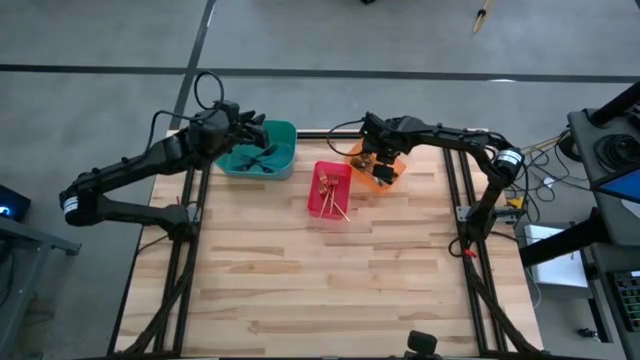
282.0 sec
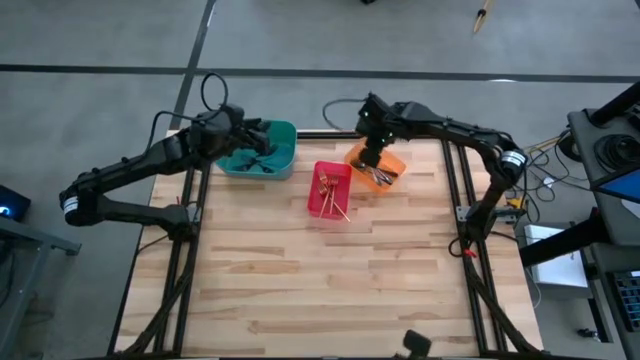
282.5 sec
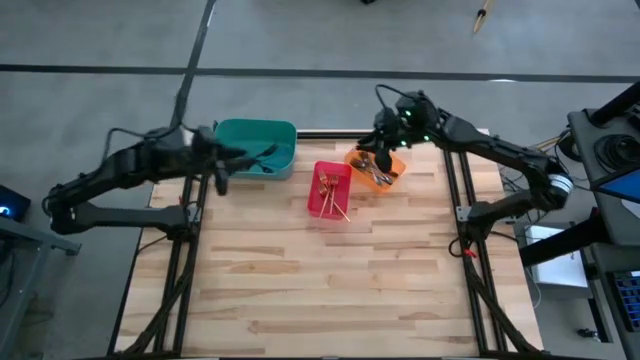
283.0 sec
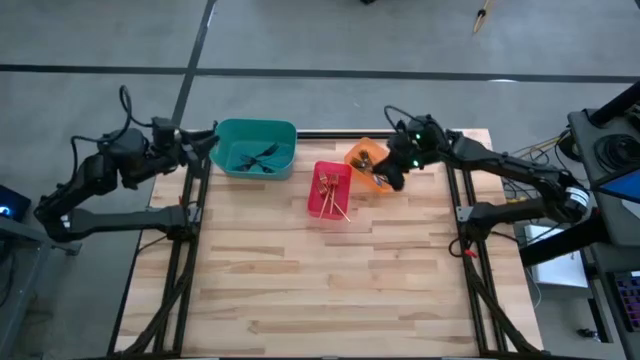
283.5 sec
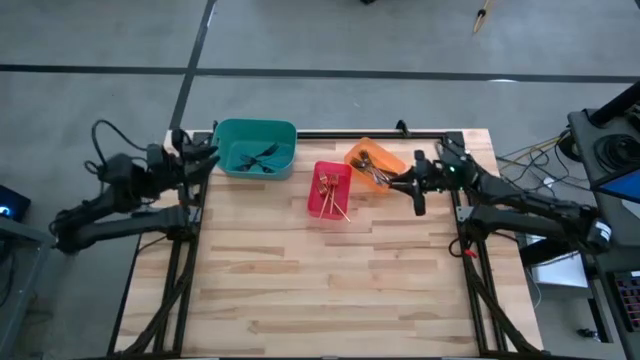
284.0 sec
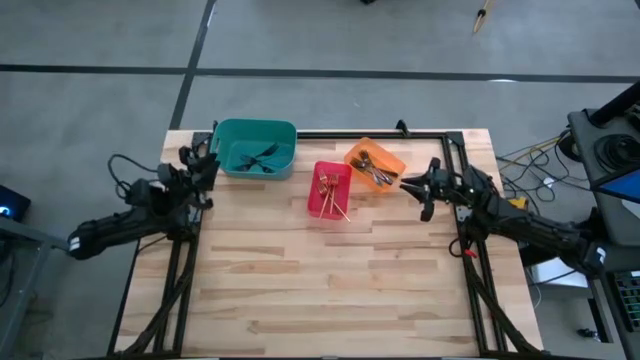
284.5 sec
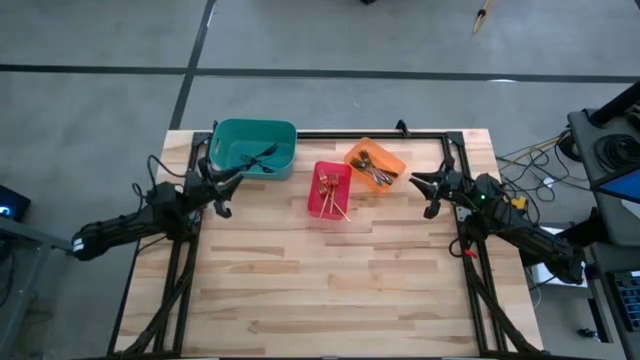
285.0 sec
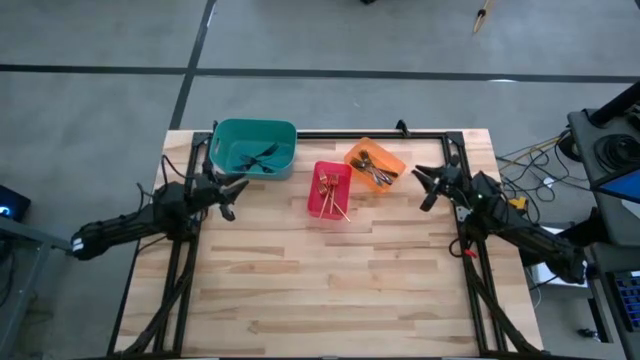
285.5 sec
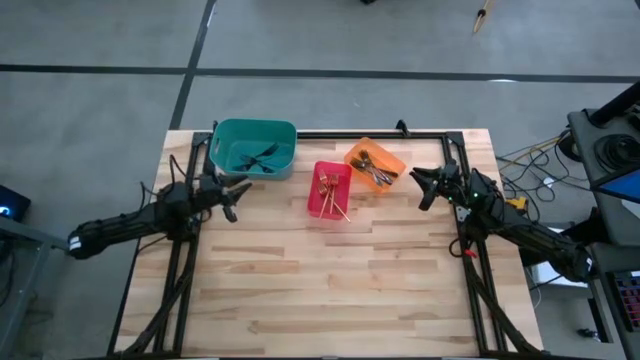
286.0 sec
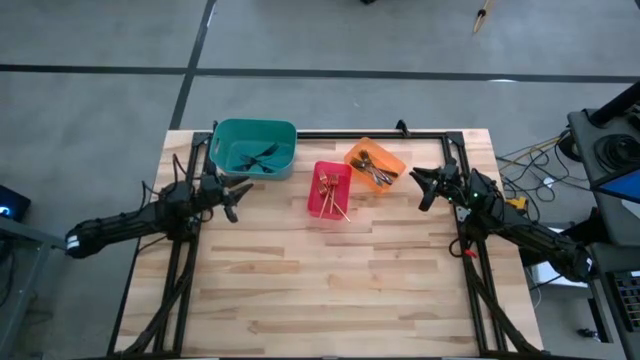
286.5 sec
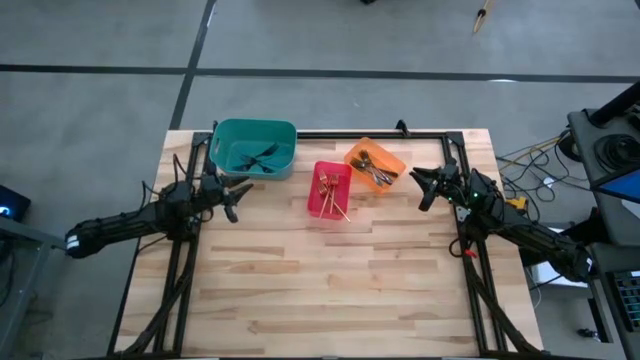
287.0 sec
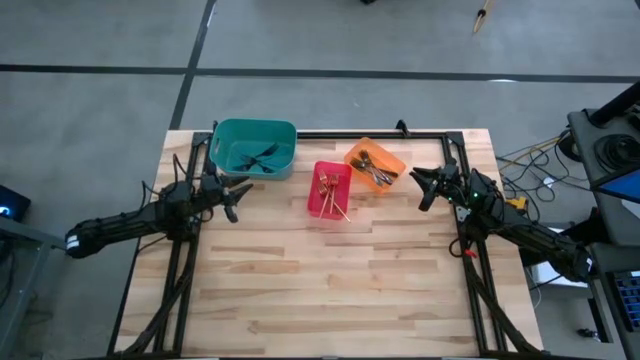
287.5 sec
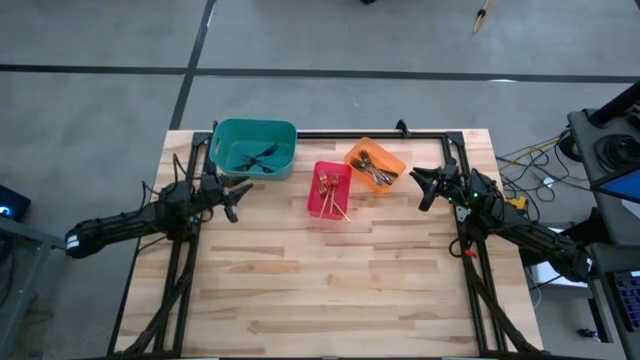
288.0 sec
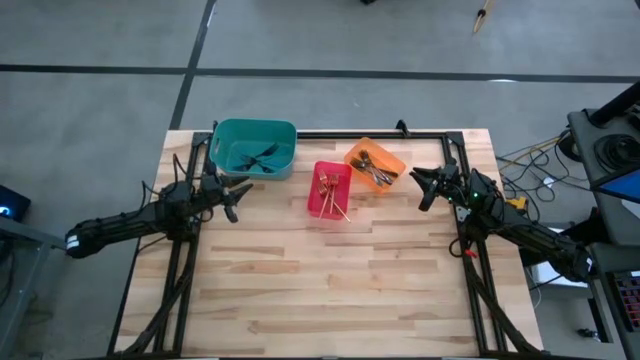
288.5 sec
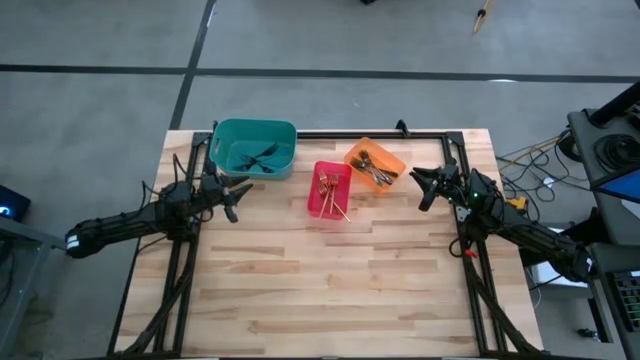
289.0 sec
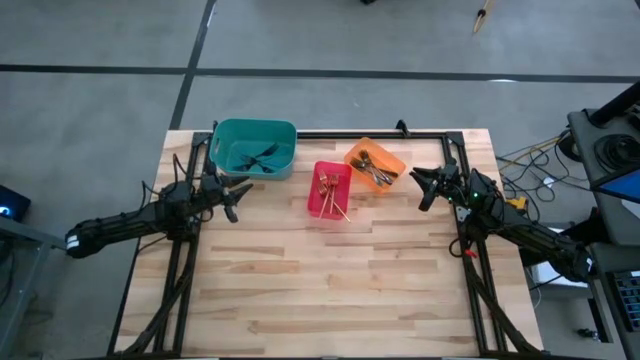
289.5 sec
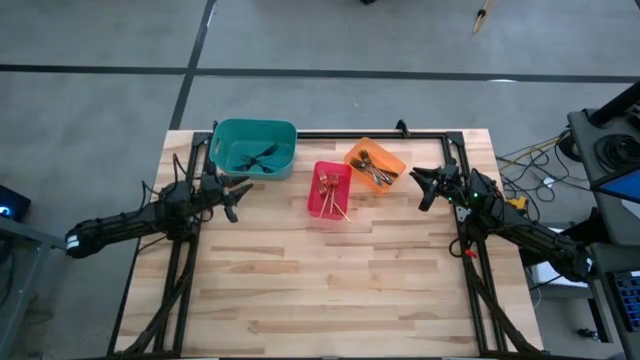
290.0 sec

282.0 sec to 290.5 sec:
Task: Sort silverware by color (type)
Return to Home Position

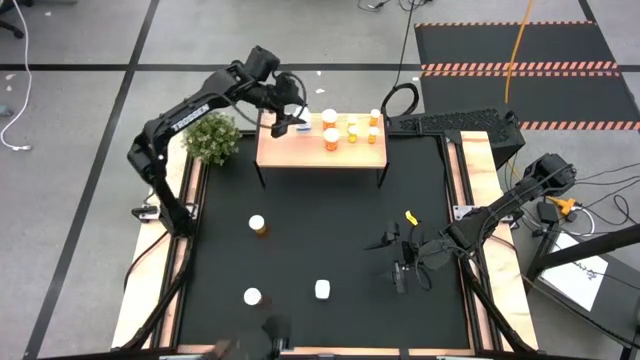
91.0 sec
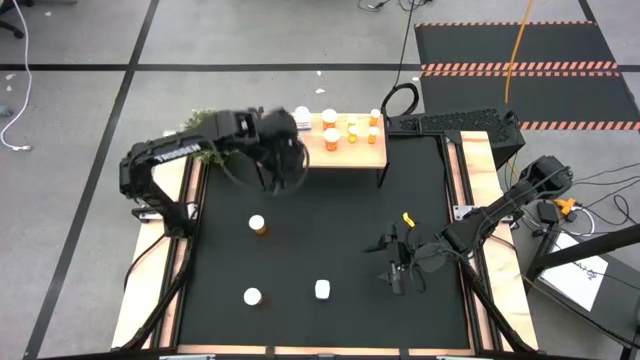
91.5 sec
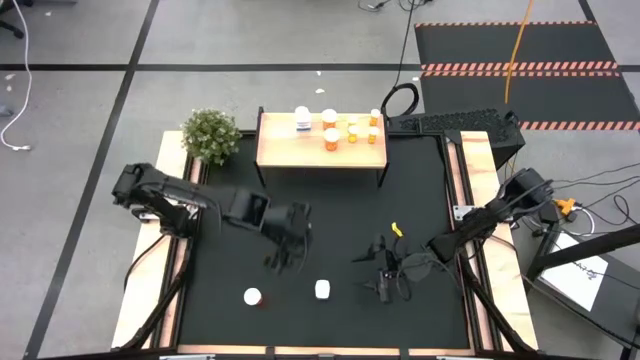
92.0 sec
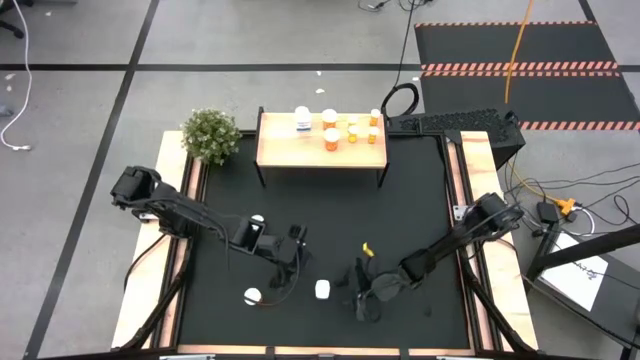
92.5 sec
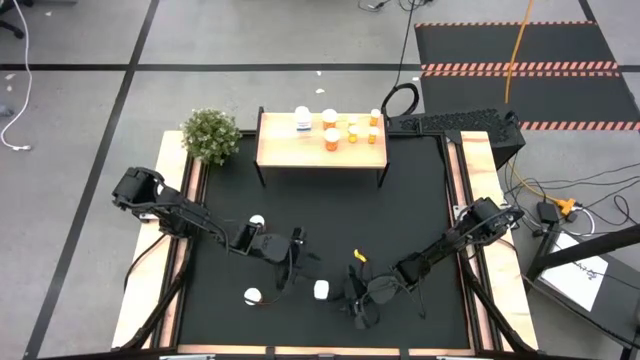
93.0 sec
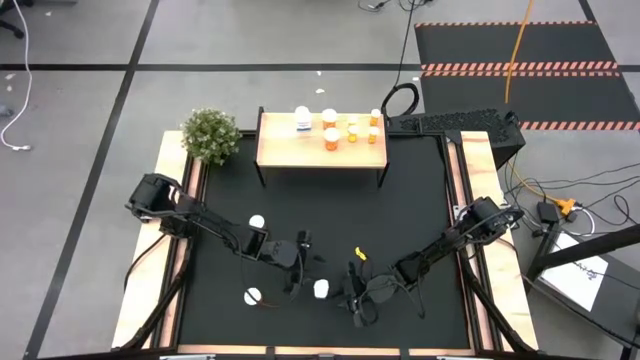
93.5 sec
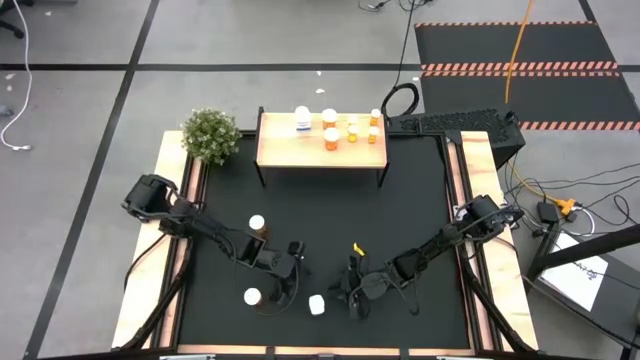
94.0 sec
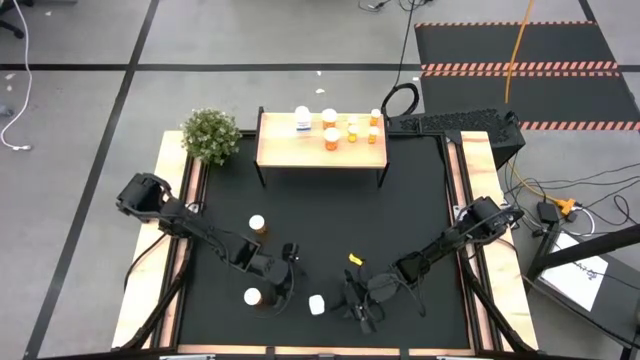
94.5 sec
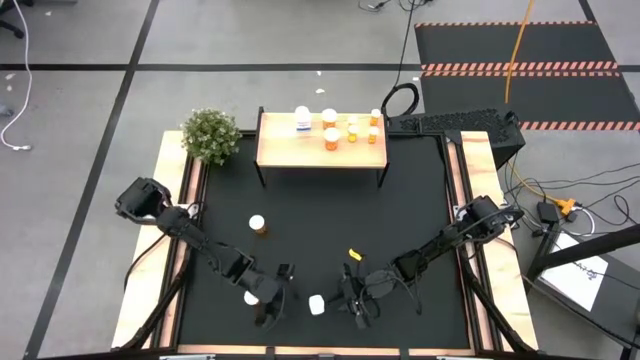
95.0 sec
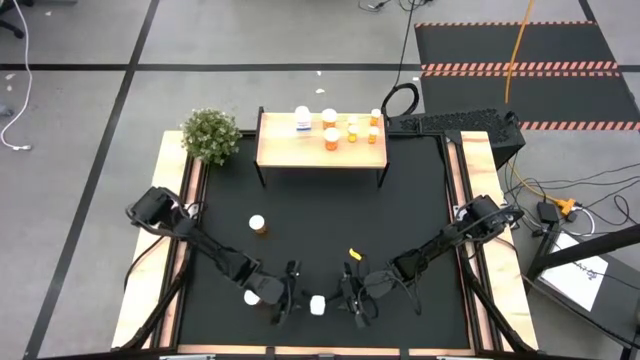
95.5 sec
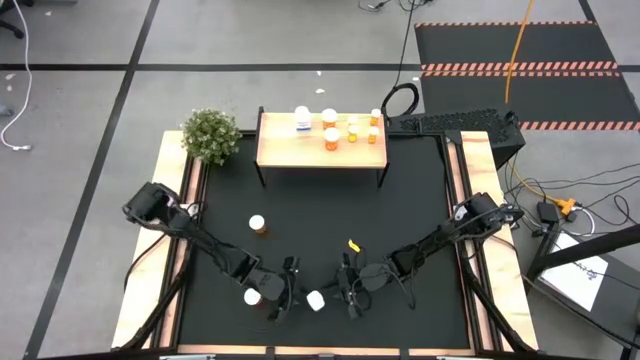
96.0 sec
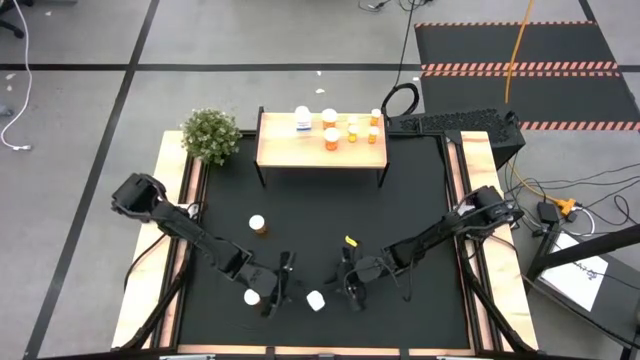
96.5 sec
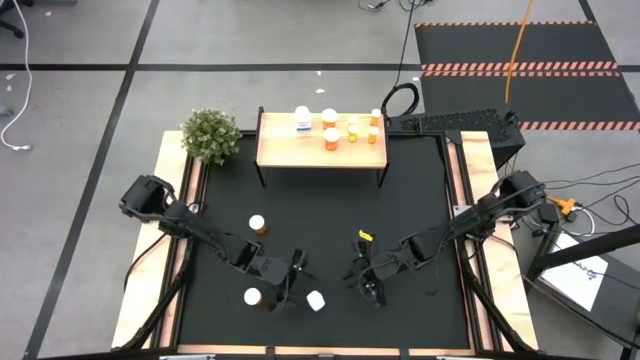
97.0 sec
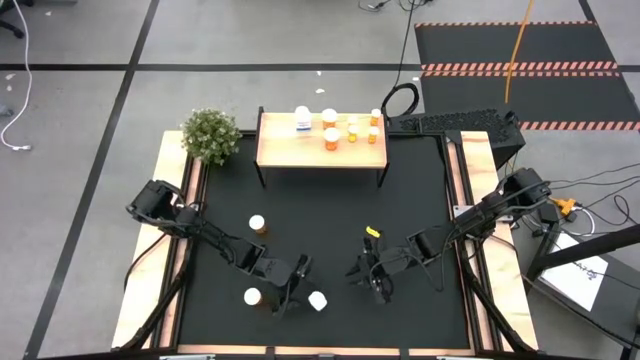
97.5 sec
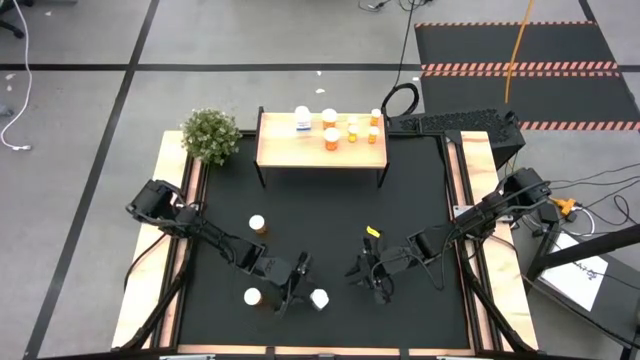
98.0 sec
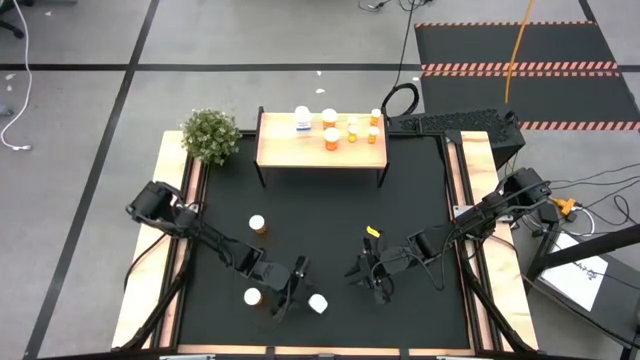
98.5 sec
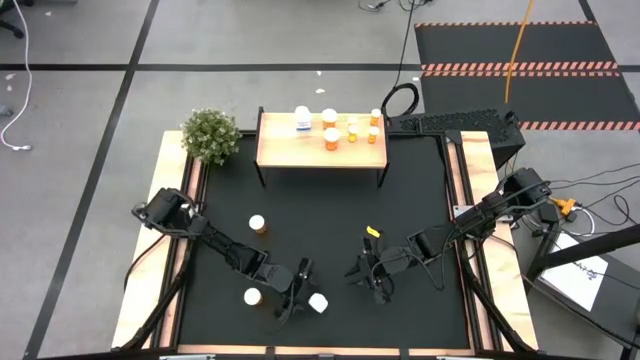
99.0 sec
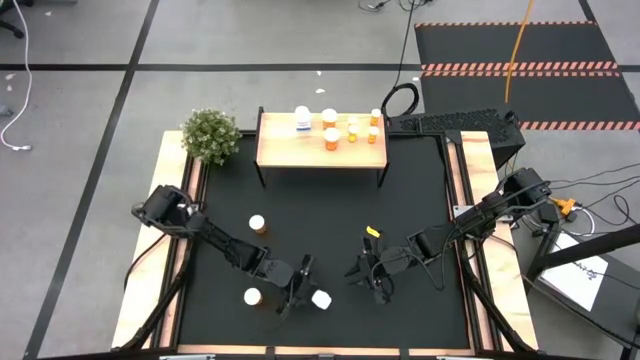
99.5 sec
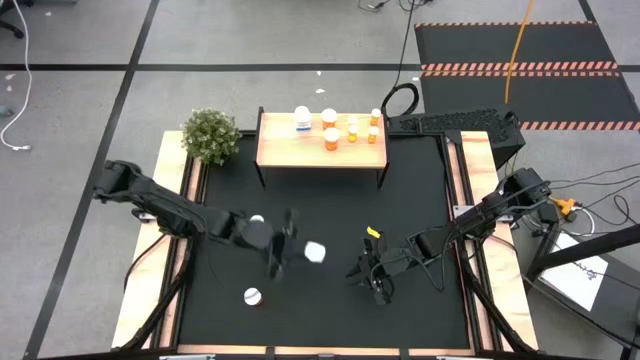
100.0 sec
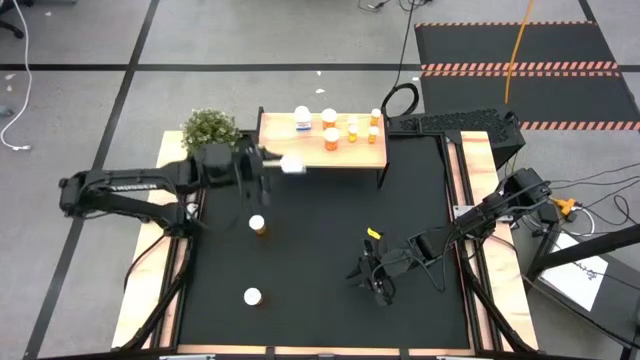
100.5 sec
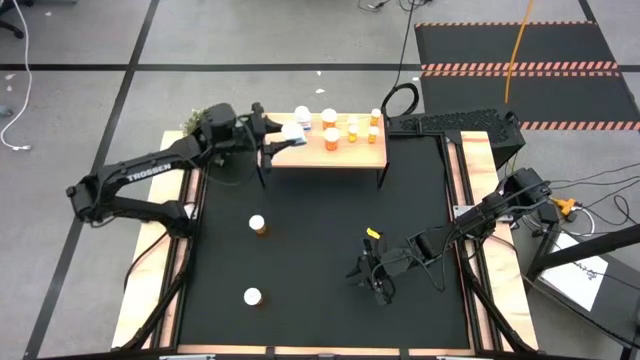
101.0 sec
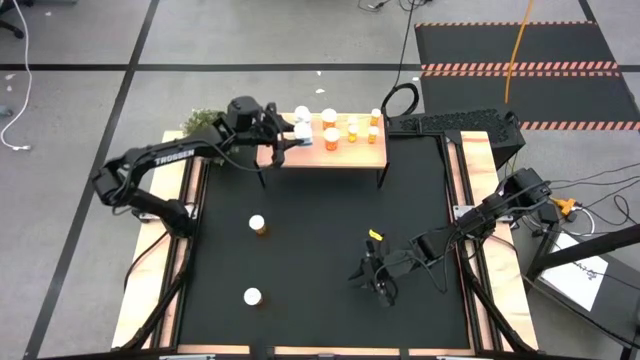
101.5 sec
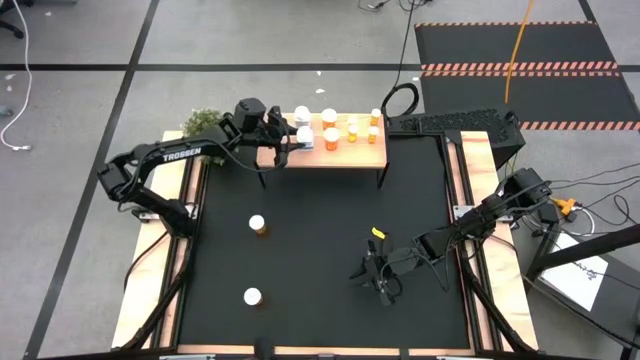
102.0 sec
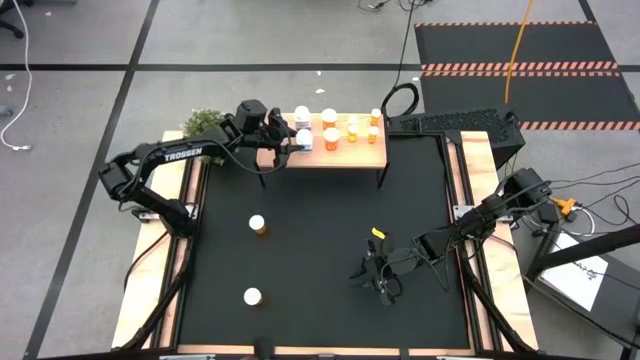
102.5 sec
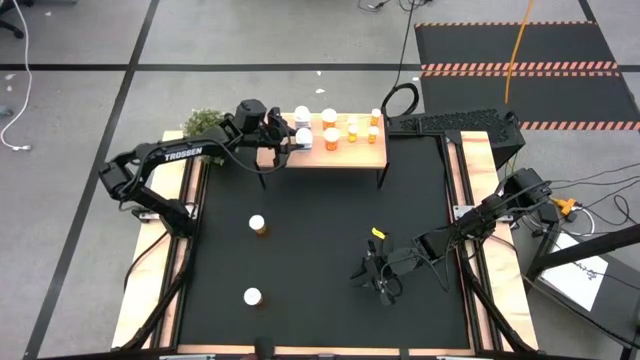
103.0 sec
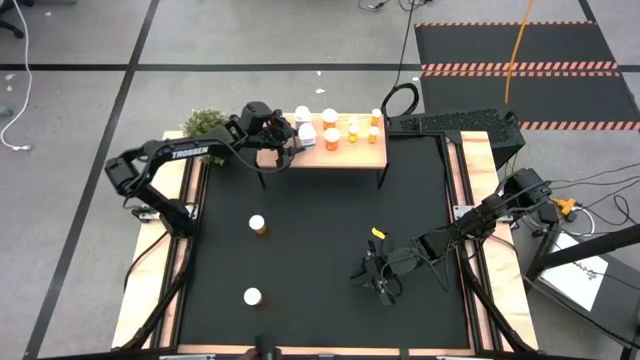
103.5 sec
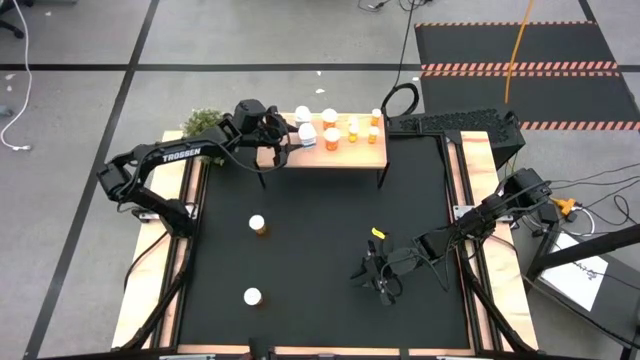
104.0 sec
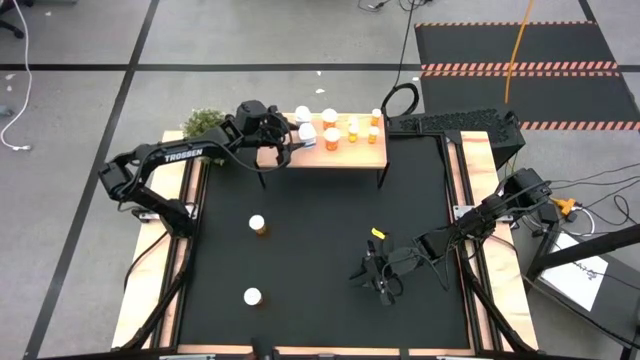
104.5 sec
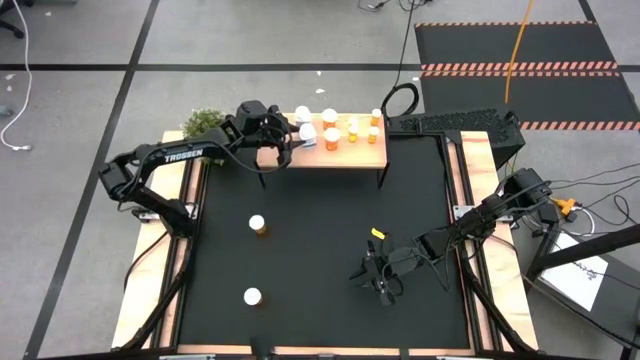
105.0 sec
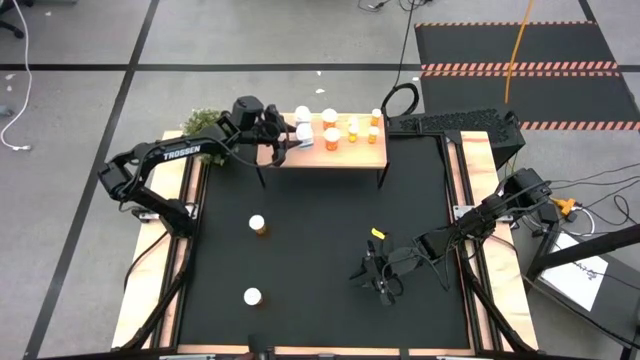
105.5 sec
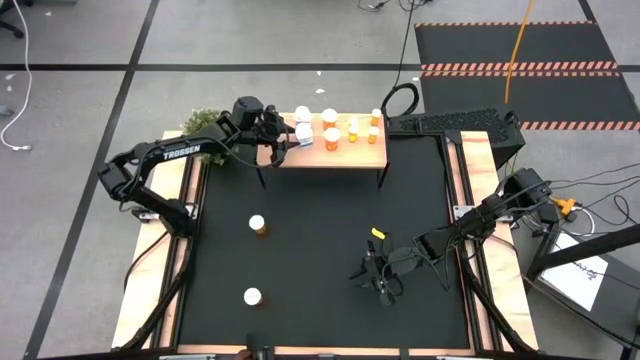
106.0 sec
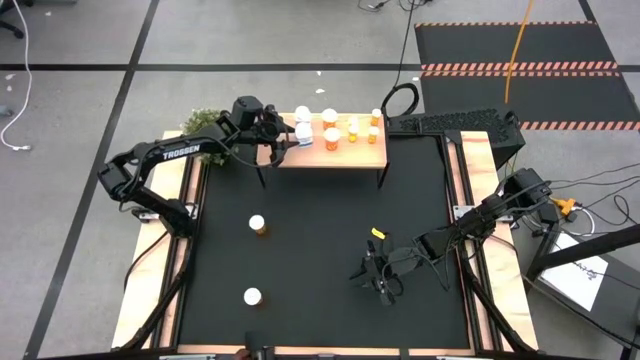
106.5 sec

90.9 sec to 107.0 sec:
Task: Pick and place medicine bottles onto shelf by color
Put the white pill bottle on the shelf aligned with the other white pill bottle
